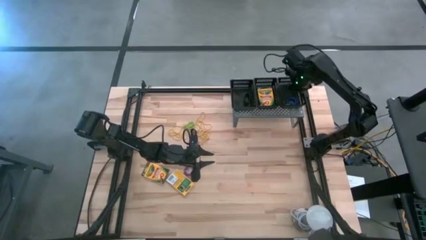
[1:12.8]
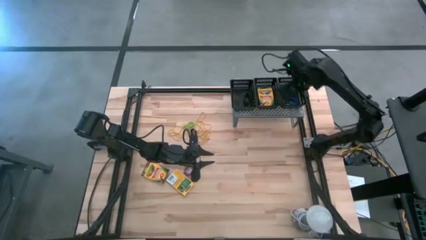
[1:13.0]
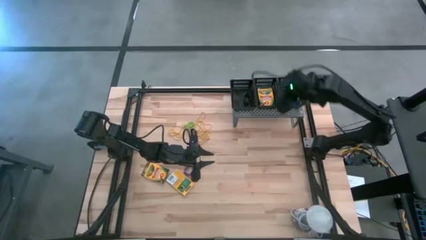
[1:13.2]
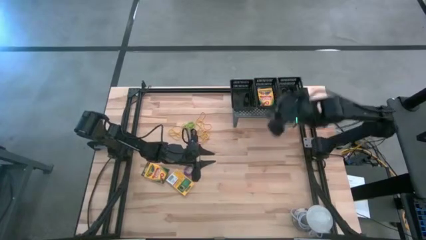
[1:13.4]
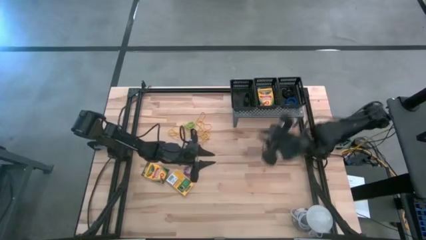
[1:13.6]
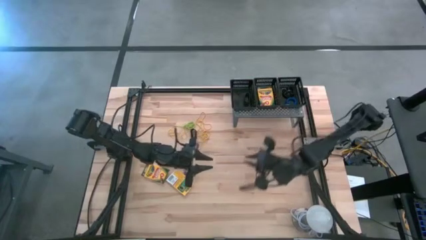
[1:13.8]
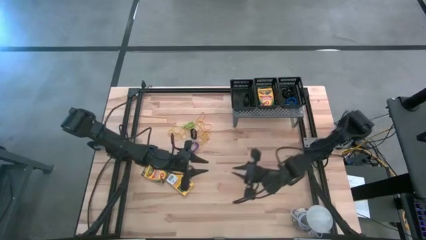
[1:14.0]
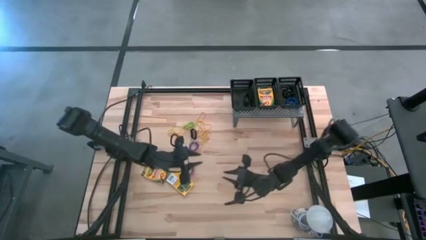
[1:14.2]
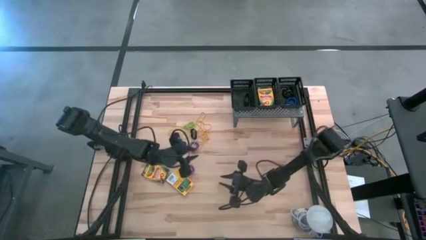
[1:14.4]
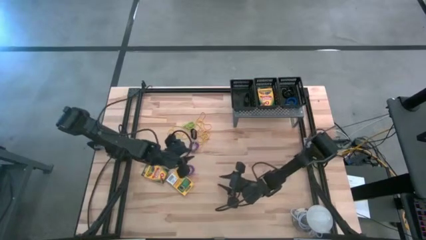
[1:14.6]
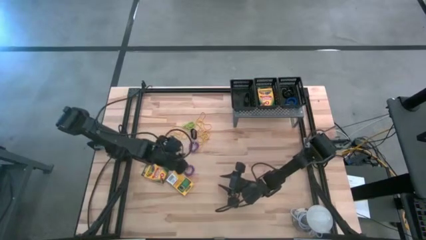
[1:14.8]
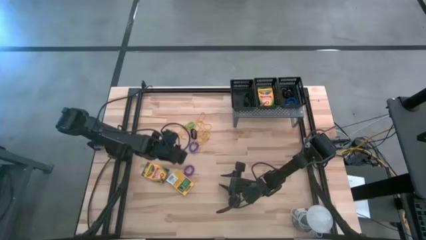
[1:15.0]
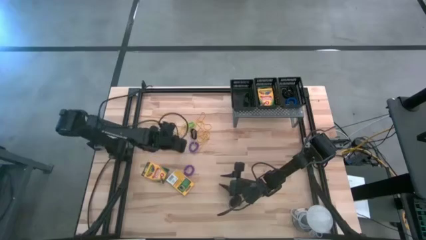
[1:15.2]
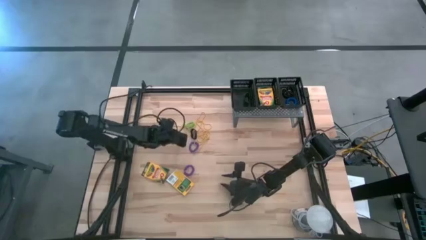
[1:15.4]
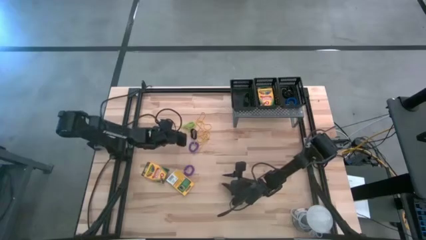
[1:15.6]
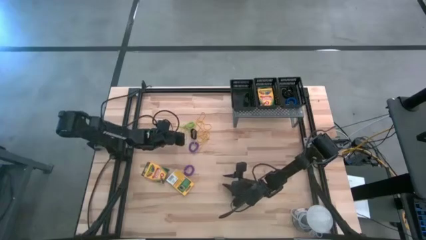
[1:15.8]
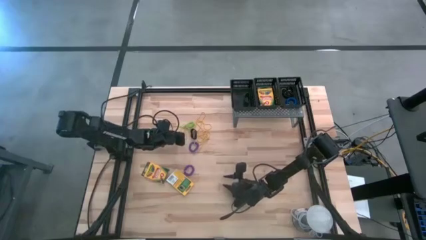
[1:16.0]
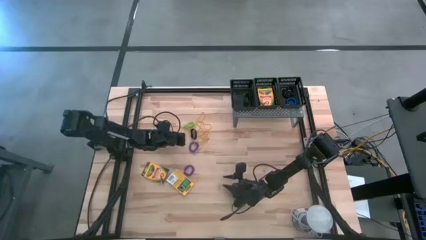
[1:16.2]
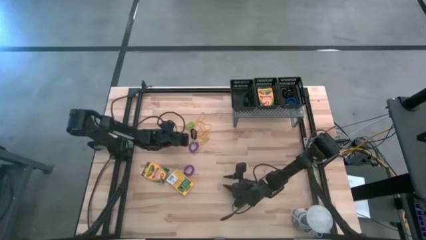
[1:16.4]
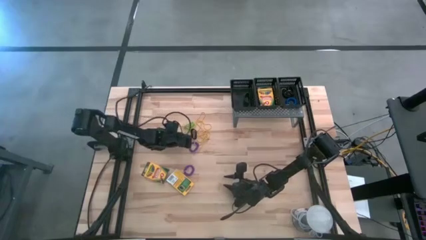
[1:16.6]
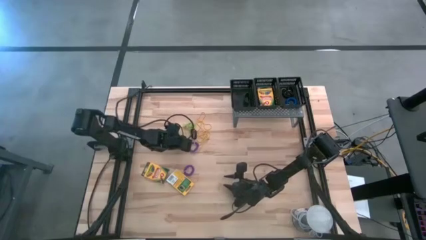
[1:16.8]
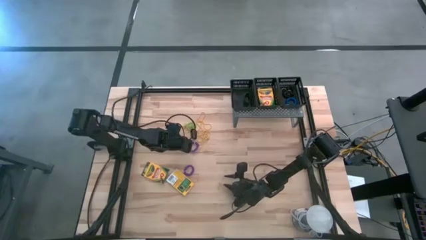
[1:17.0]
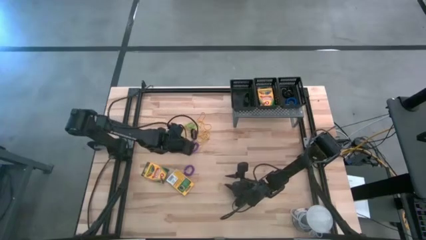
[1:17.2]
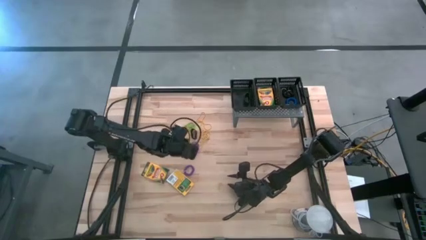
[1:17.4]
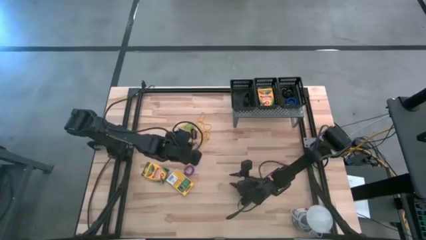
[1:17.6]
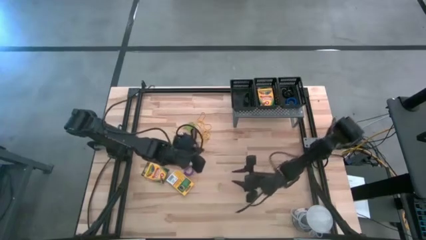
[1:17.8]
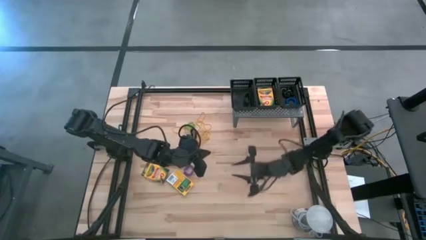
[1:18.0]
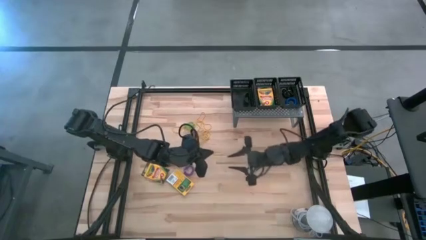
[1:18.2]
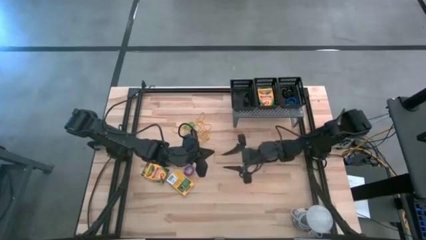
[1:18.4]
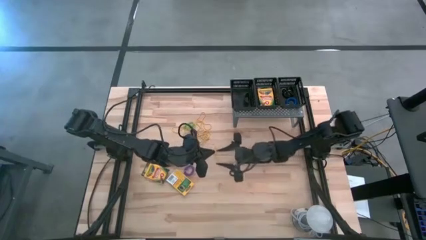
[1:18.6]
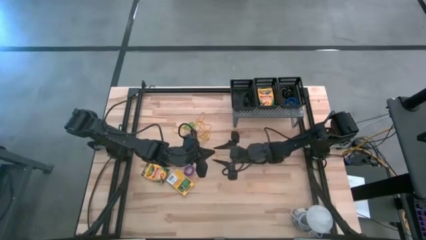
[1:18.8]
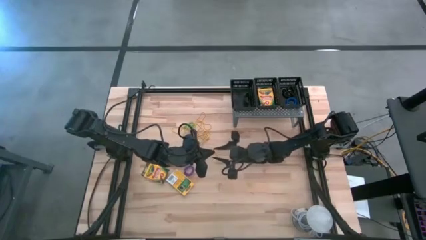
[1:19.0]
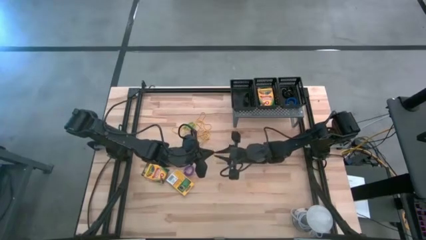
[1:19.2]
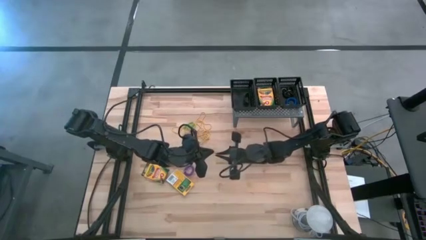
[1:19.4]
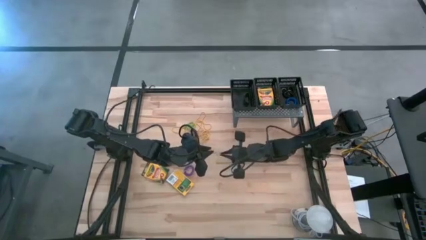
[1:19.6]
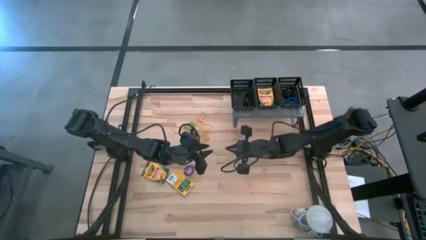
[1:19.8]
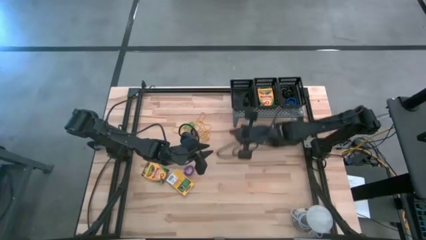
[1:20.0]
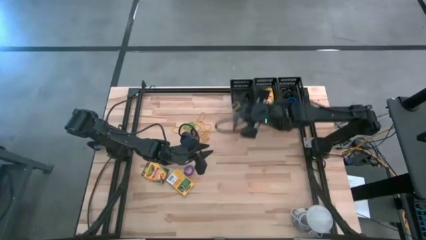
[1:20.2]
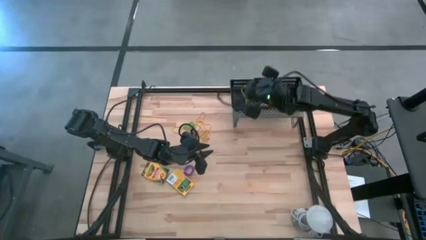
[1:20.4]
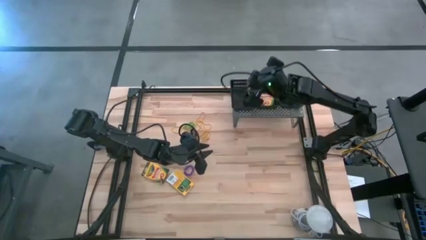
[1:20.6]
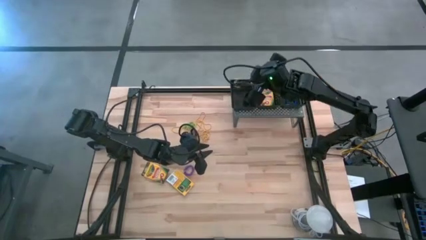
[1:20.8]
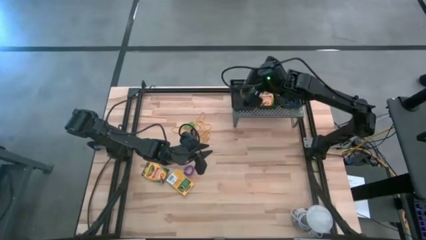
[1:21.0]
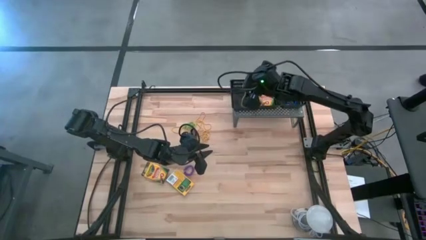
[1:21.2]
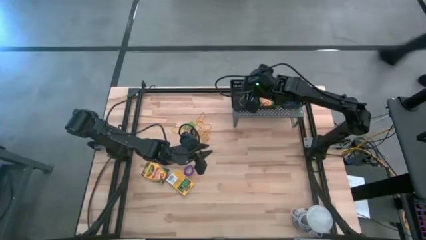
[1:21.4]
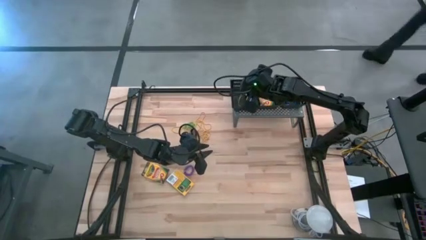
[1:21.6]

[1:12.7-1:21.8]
Task: Pick & Place Office Desk Supplies
Put the yellow rubber band into the left black basket on the shelf

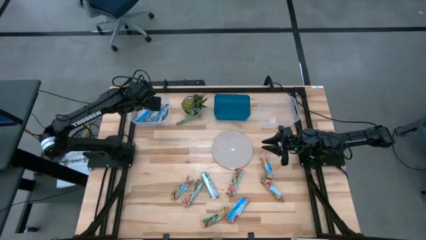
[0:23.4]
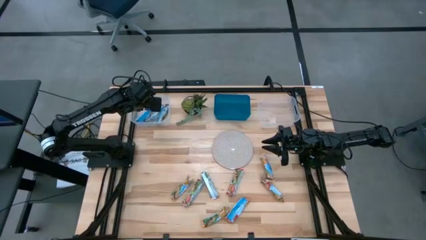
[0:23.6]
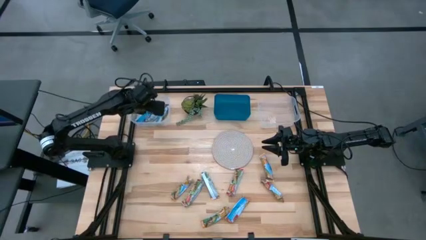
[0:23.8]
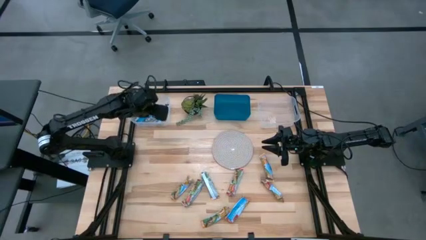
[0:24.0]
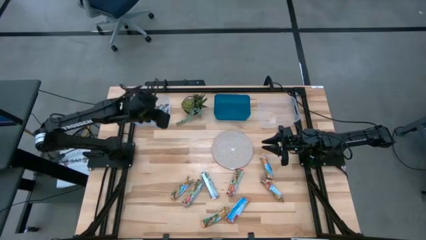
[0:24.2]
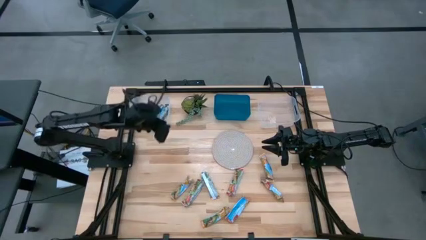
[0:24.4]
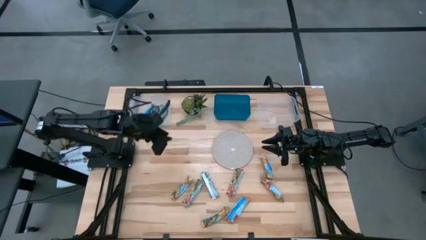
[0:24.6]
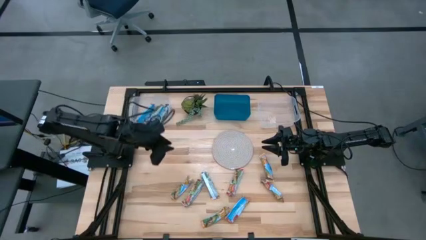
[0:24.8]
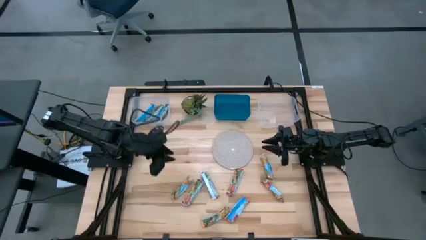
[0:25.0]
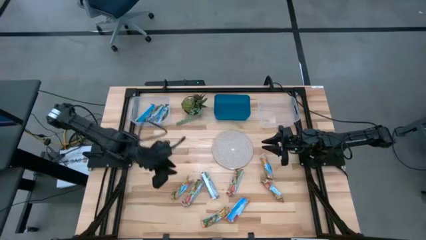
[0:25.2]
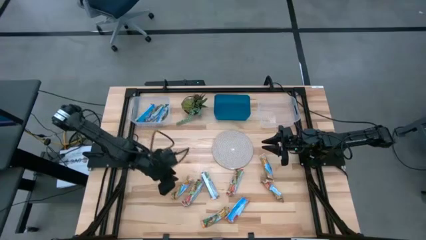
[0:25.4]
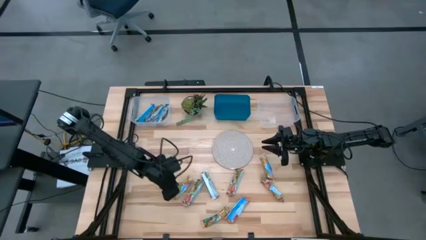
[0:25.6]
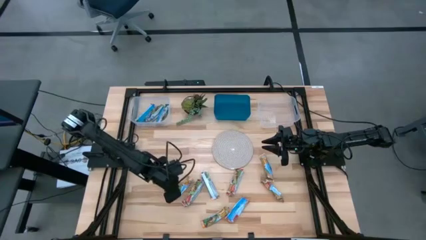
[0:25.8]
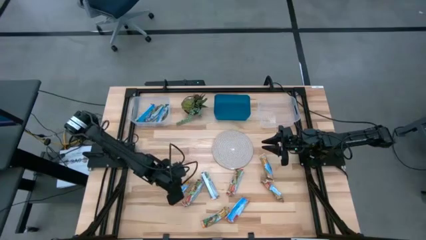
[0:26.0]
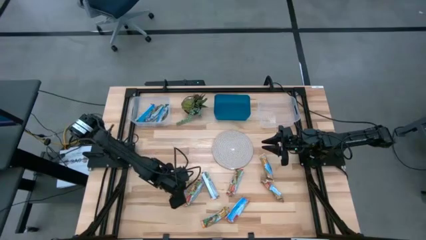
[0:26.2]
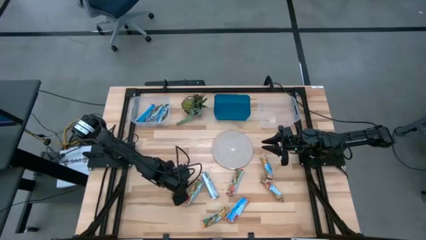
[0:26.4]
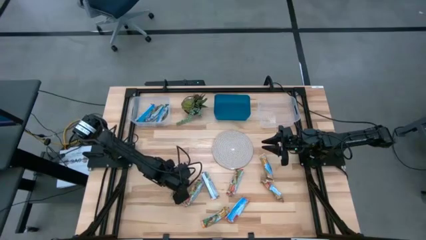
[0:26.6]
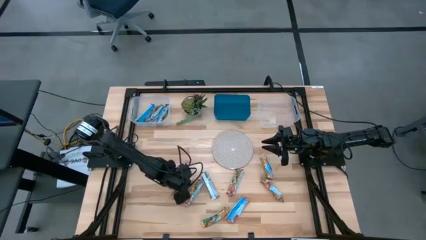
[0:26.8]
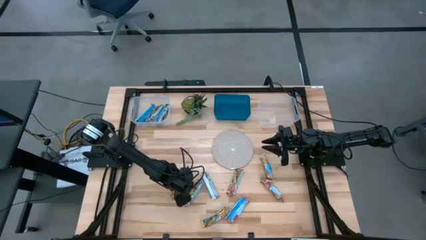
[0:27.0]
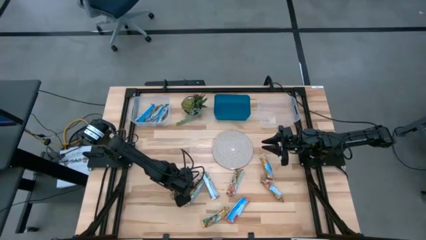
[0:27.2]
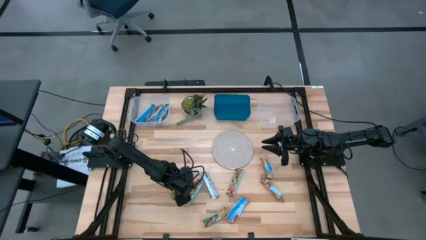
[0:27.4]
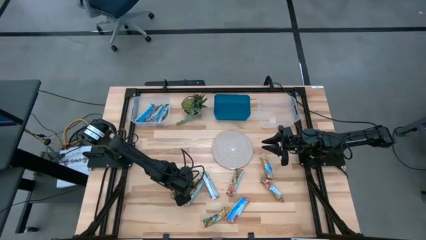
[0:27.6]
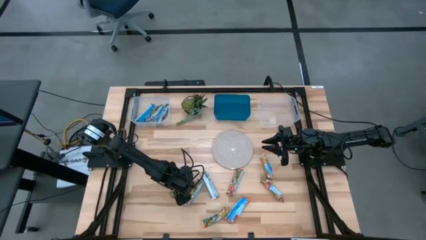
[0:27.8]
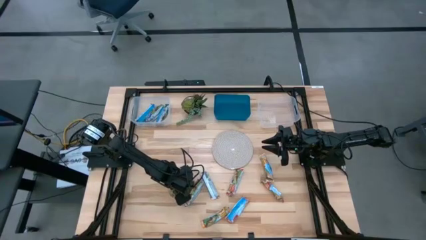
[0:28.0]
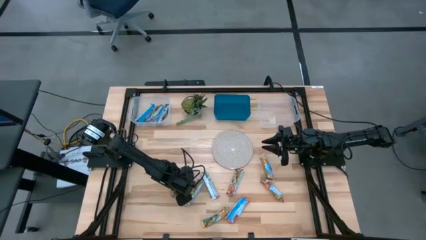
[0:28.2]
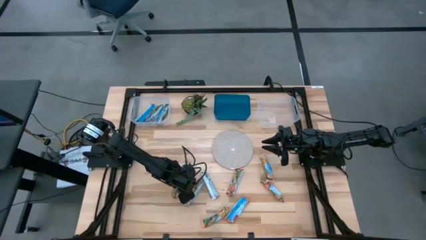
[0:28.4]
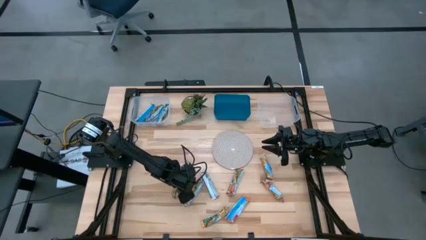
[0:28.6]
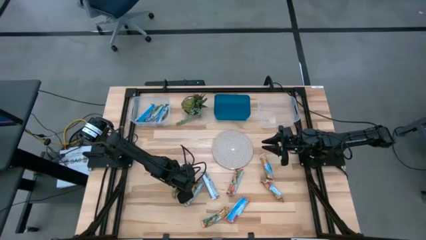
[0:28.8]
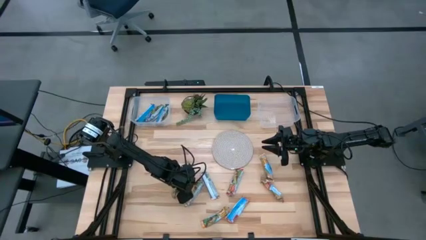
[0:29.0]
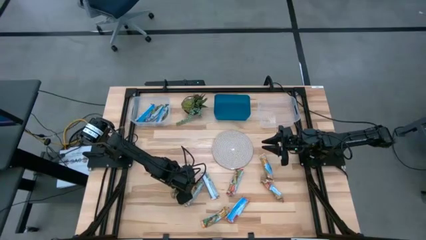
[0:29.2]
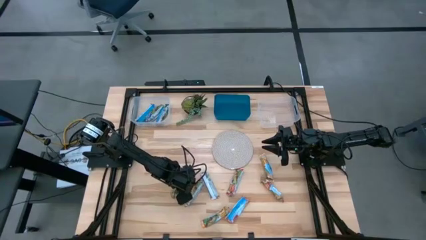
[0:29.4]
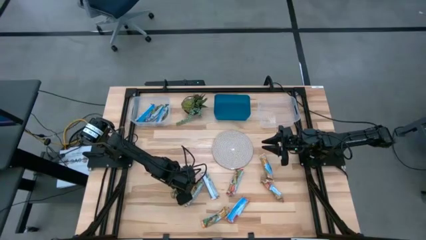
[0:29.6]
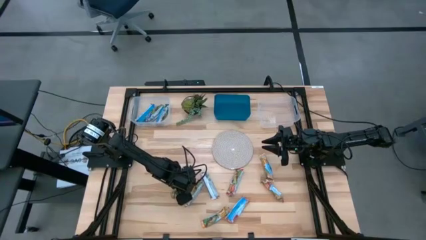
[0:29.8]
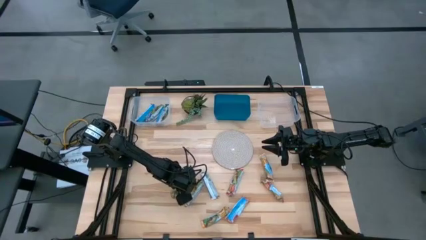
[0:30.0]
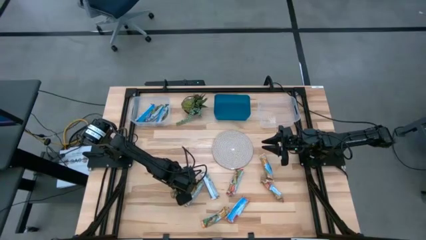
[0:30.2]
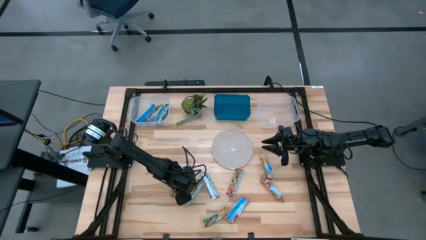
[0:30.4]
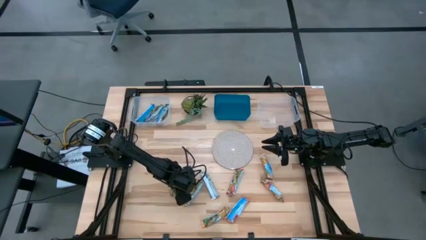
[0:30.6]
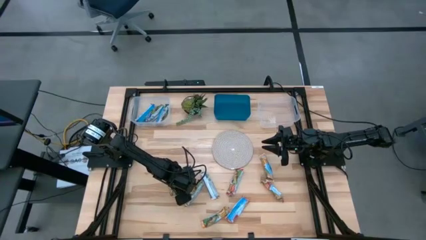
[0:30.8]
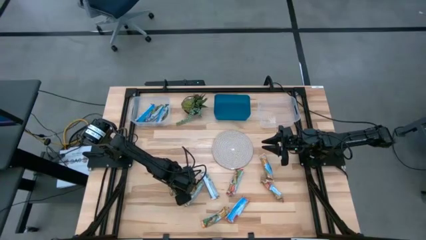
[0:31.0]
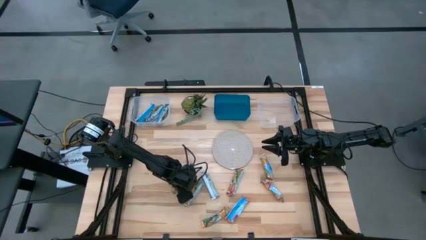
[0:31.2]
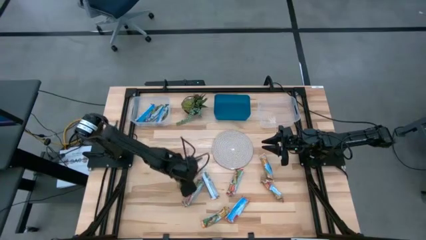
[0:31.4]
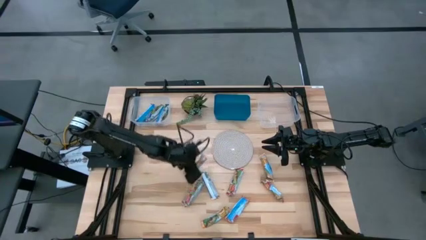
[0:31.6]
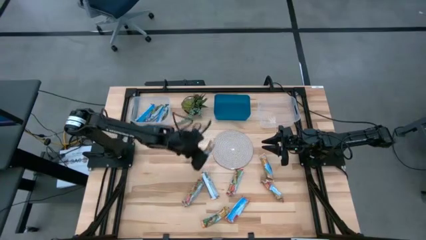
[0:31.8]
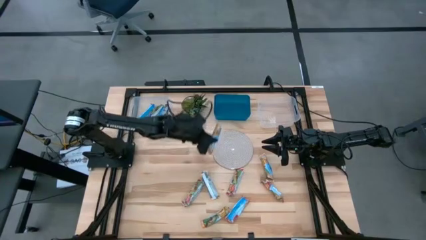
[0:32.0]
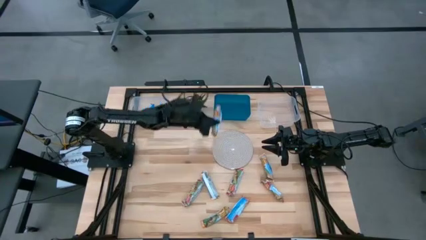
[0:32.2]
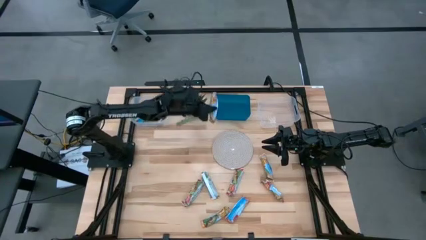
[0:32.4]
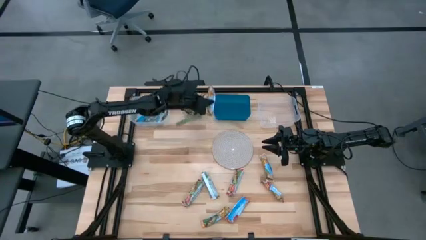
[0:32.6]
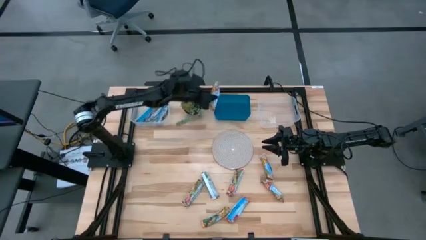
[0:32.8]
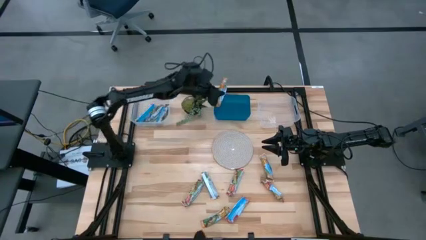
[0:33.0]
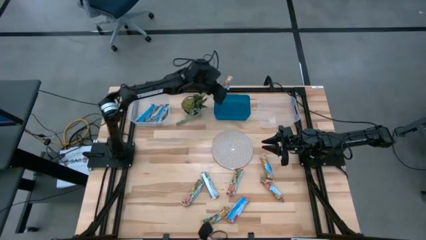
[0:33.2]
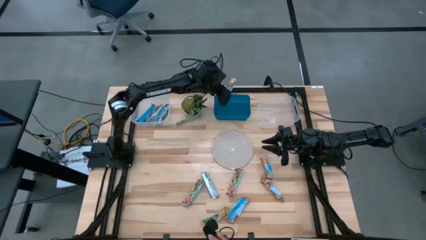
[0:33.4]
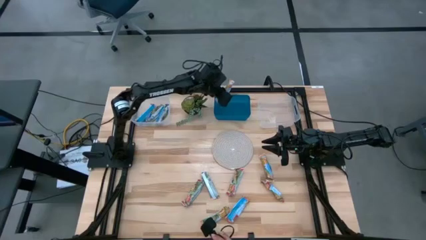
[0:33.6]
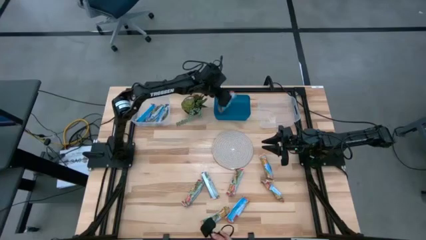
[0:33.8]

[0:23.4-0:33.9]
Task: Pick and place Granola Bars by type
Put the yellow granola bar into the blue bin
